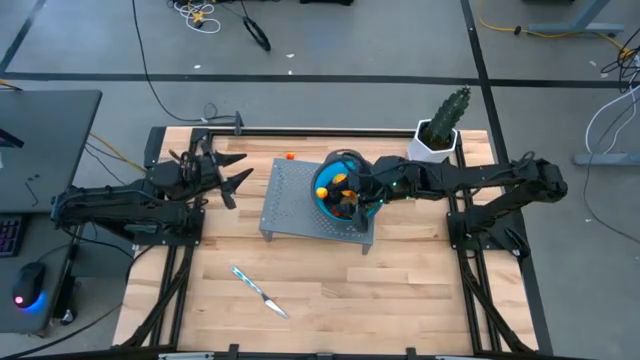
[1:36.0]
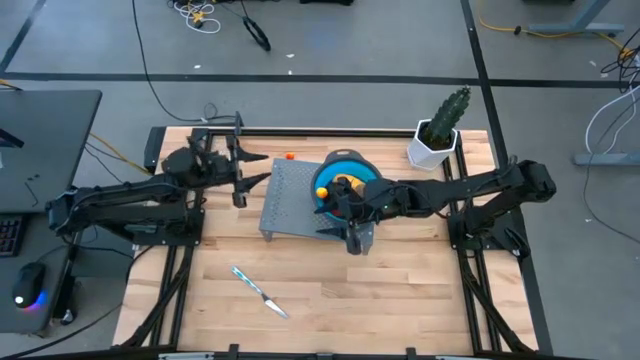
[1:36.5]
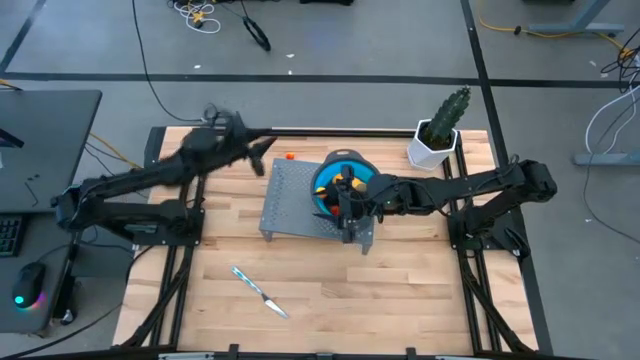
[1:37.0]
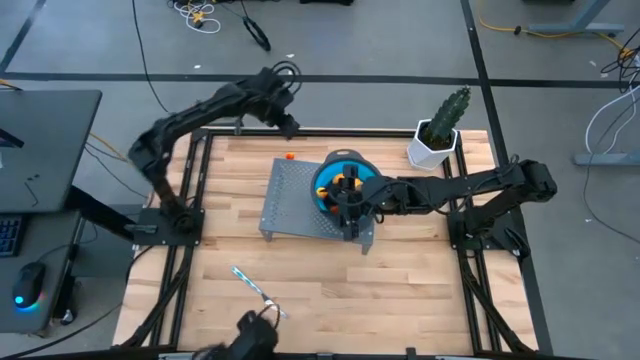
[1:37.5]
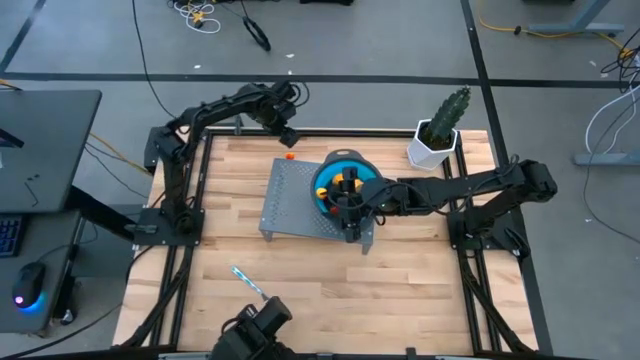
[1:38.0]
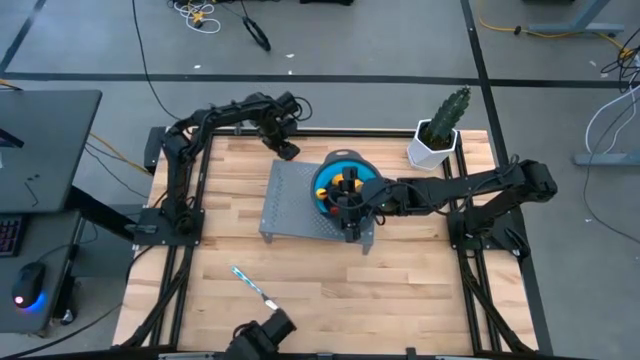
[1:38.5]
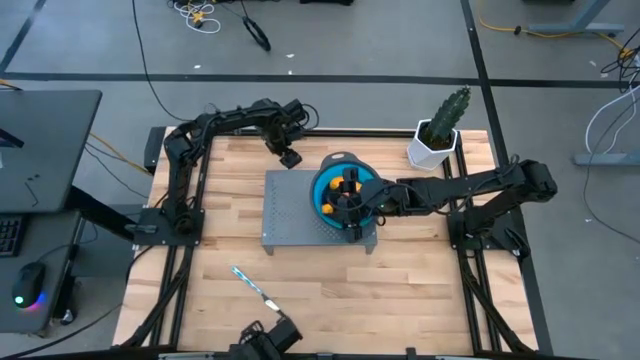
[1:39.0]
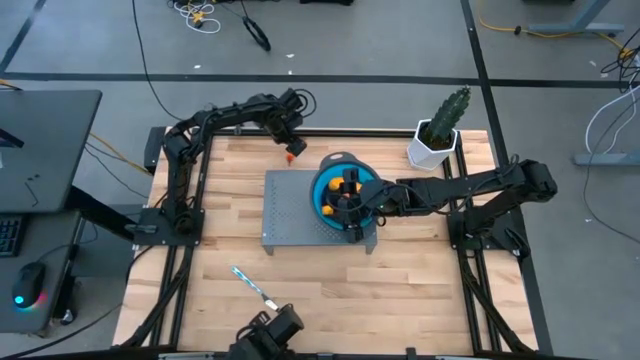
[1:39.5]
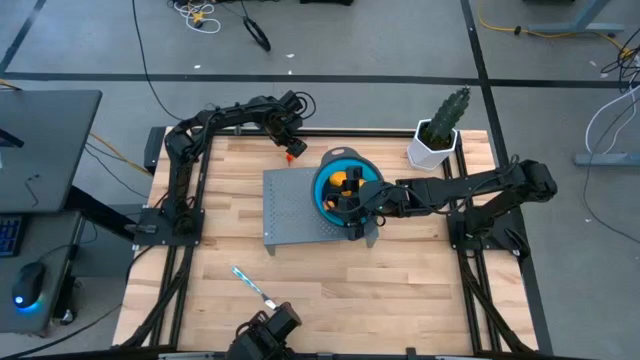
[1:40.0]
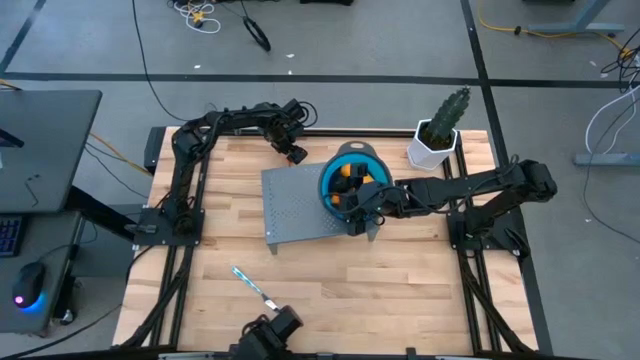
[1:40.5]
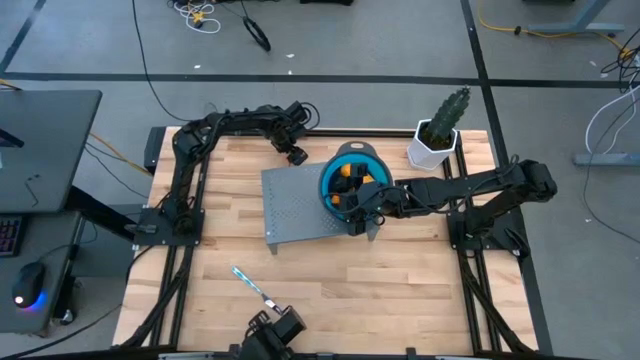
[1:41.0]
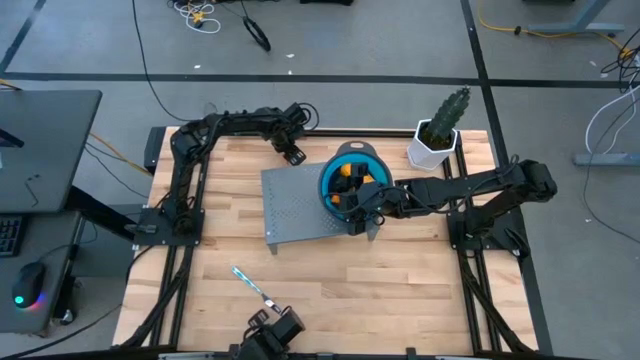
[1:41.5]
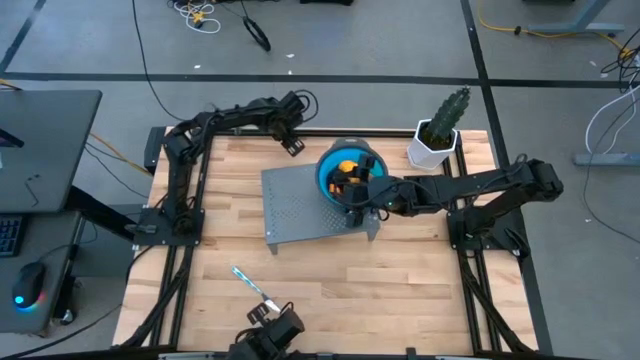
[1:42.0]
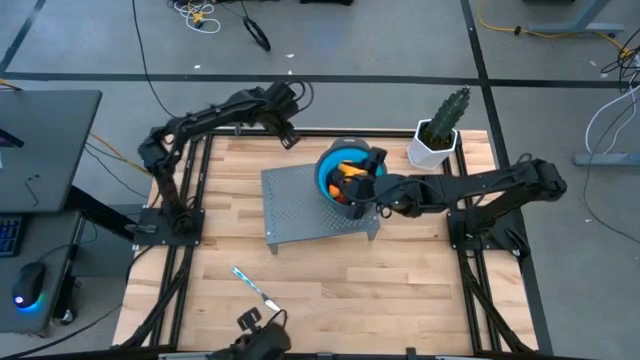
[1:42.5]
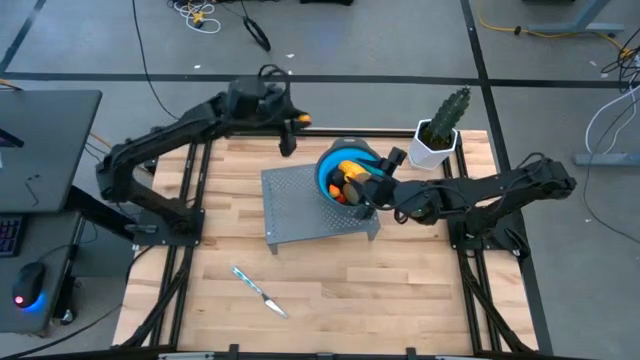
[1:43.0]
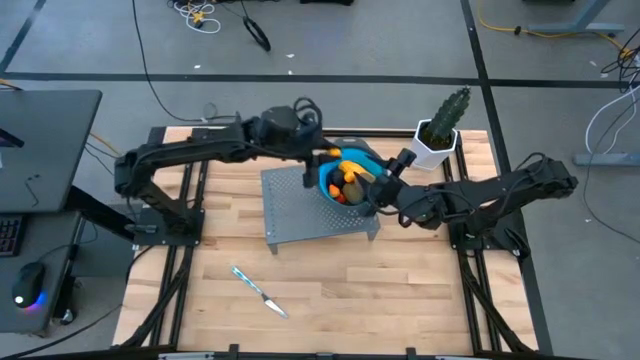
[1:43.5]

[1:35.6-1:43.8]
Task: Pick & Place Fruit
Put the orange pear into the blue strainer bowl on the shelf

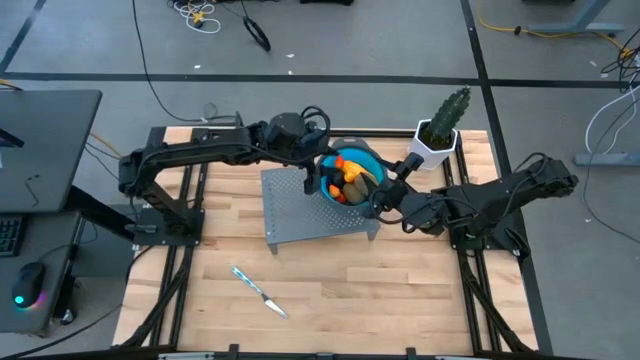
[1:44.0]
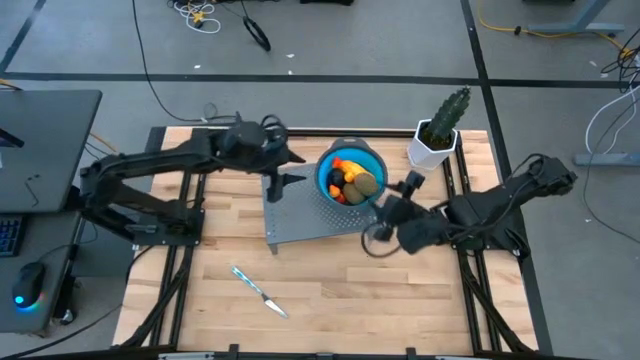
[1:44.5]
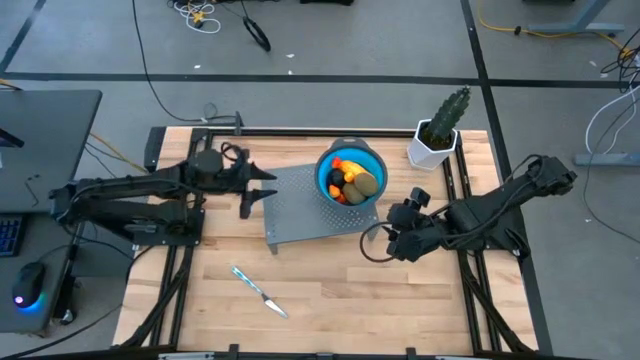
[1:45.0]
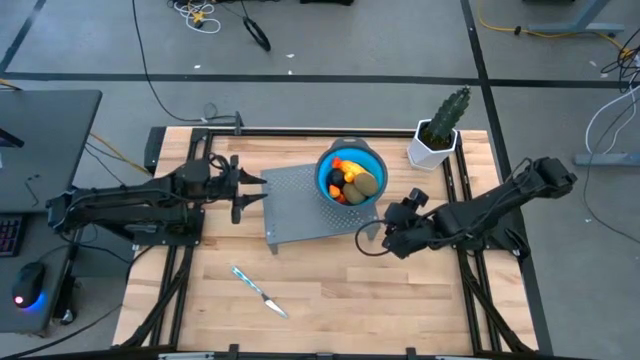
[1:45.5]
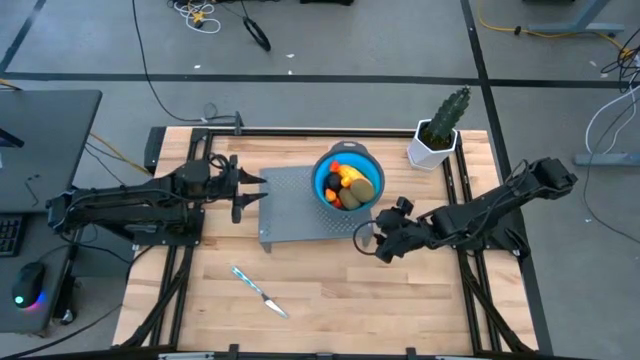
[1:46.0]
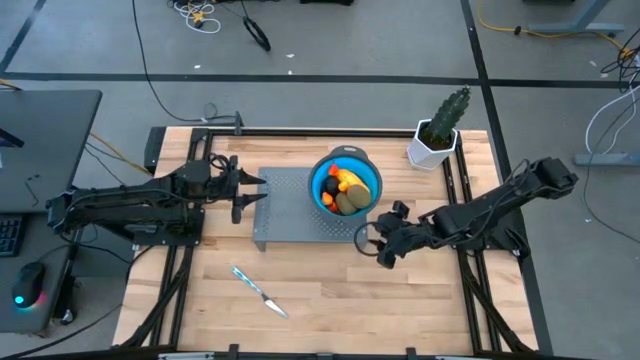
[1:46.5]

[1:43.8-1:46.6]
Adjust the shelf

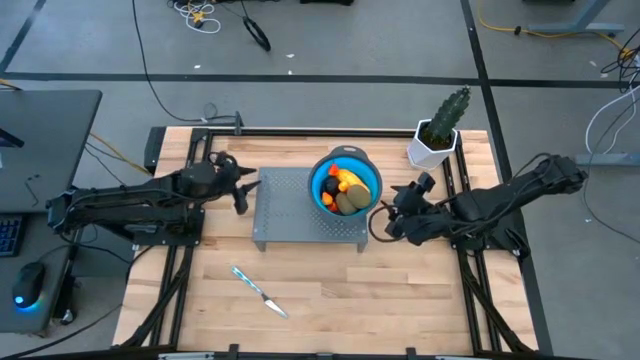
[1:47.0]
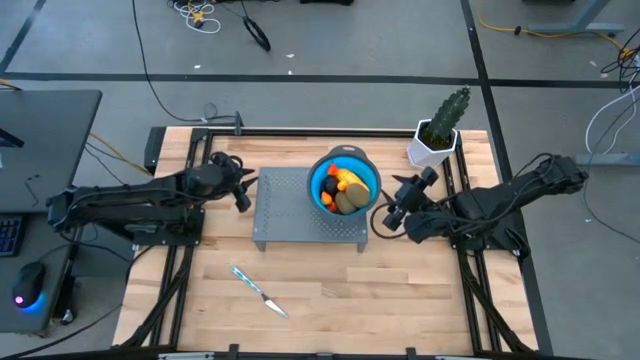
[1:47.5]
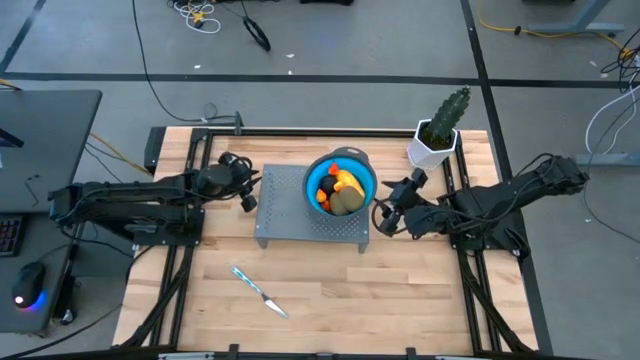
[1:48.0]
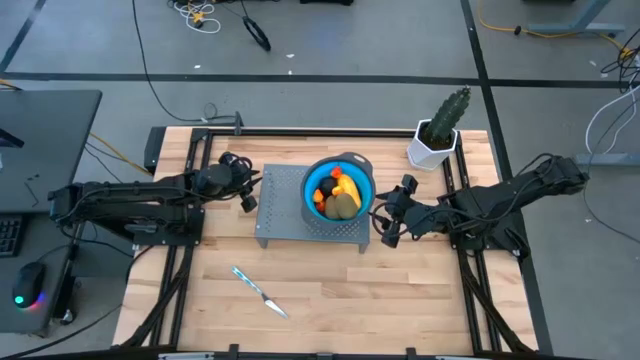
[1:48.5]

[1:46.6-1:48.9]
Adjust the blue strainer bowl on the shelf

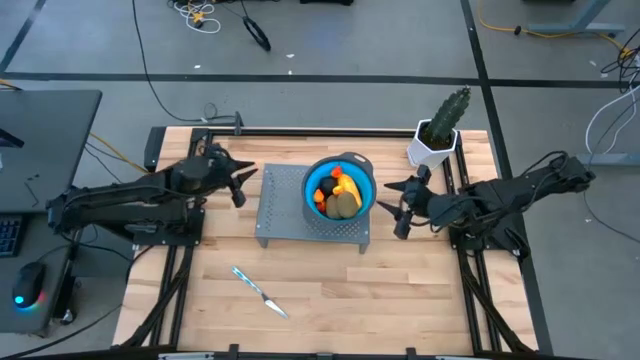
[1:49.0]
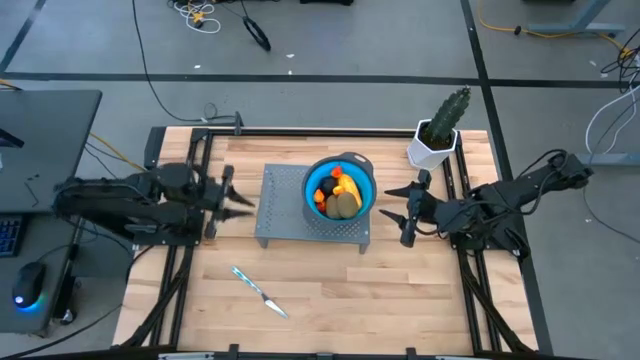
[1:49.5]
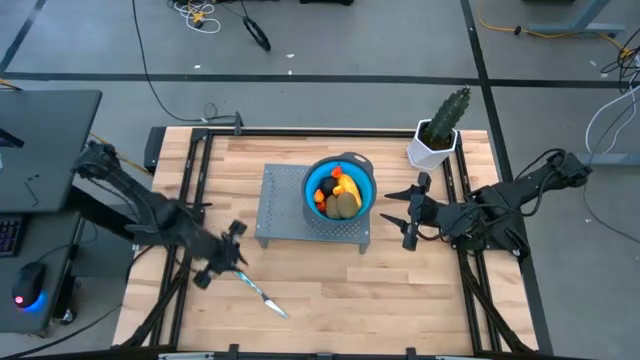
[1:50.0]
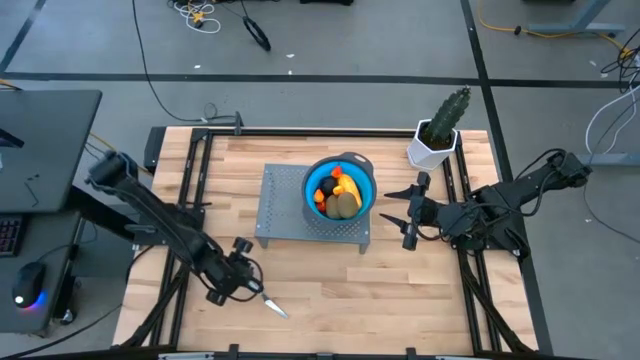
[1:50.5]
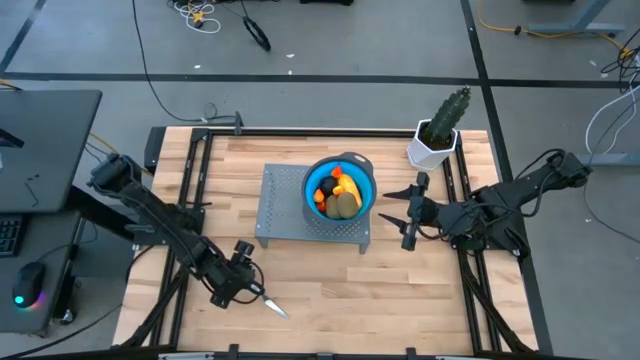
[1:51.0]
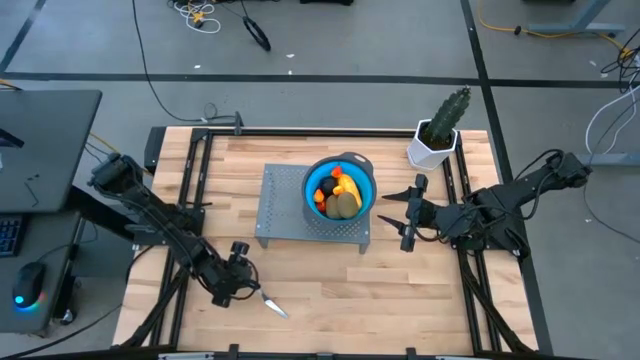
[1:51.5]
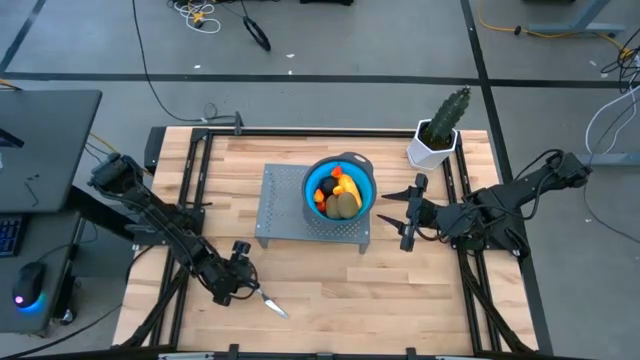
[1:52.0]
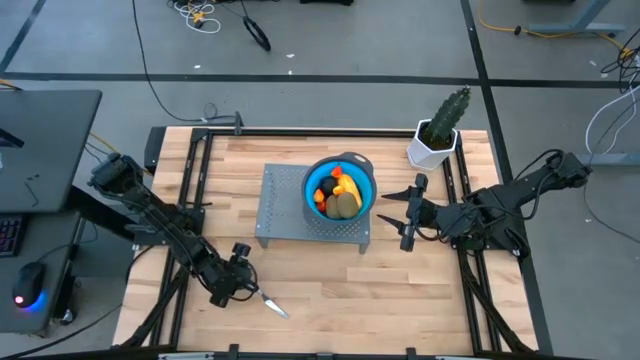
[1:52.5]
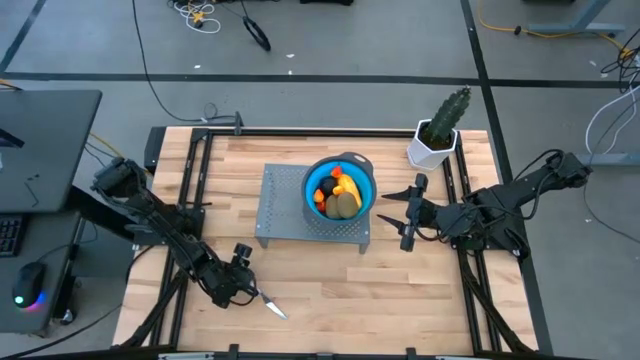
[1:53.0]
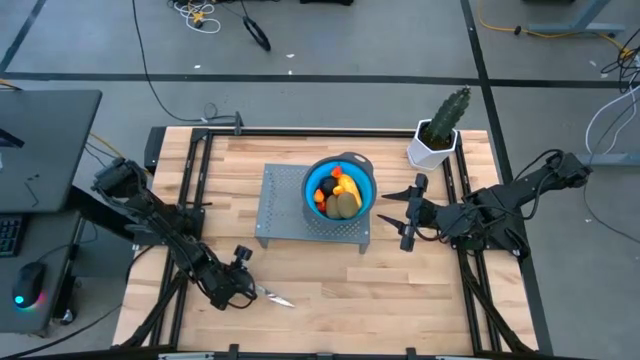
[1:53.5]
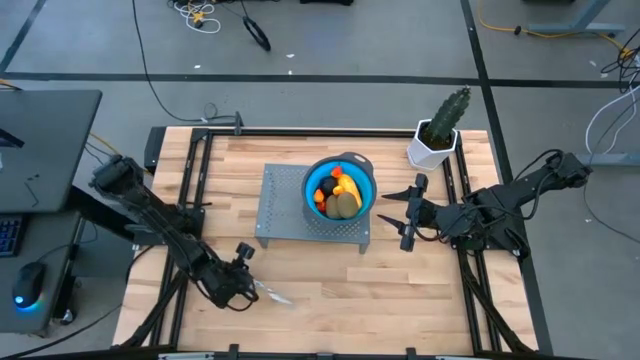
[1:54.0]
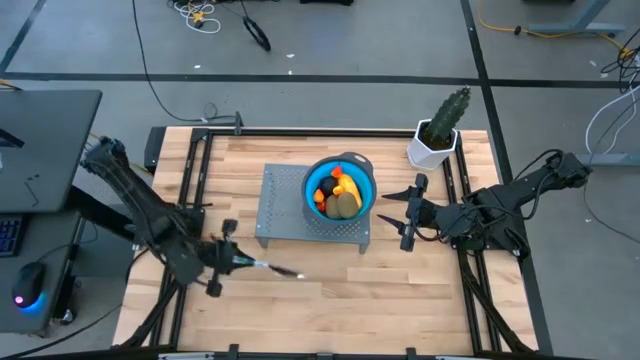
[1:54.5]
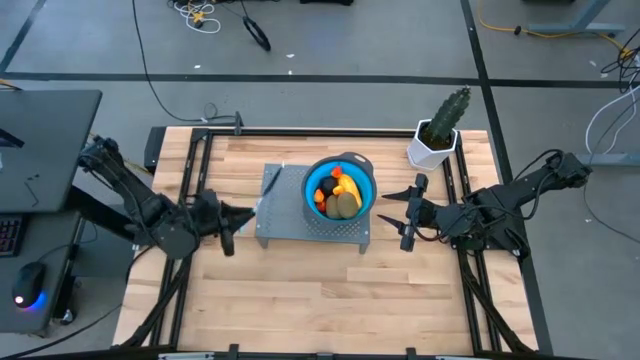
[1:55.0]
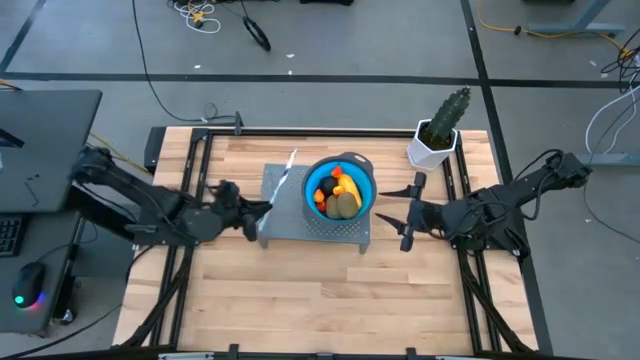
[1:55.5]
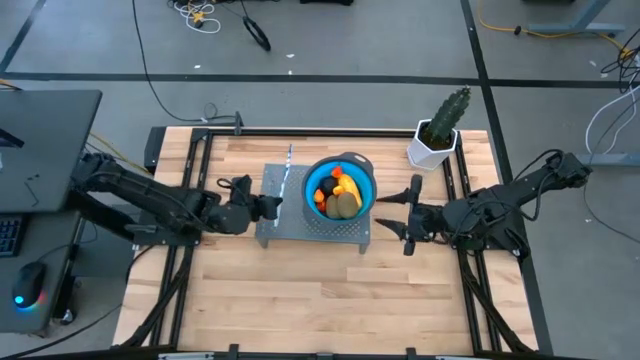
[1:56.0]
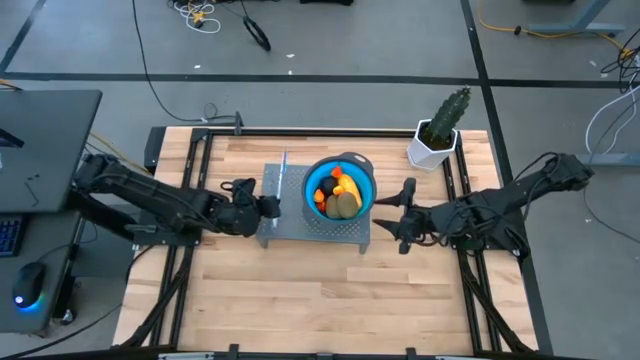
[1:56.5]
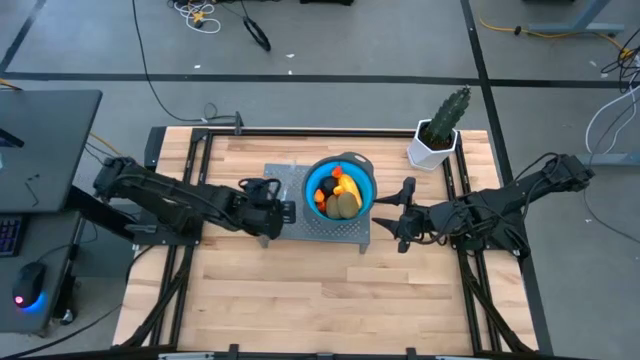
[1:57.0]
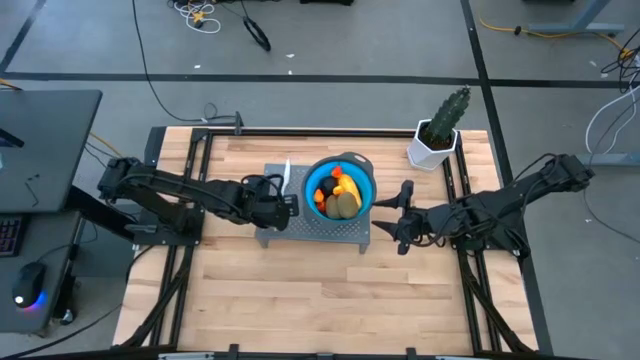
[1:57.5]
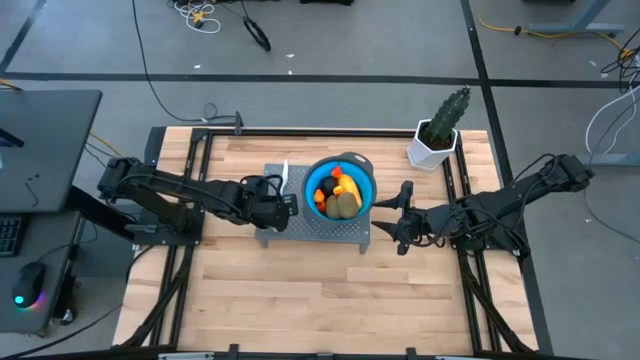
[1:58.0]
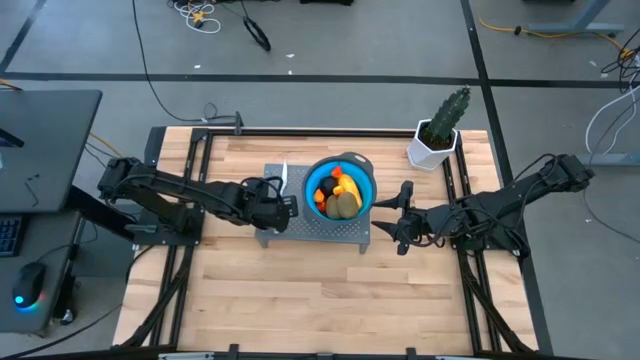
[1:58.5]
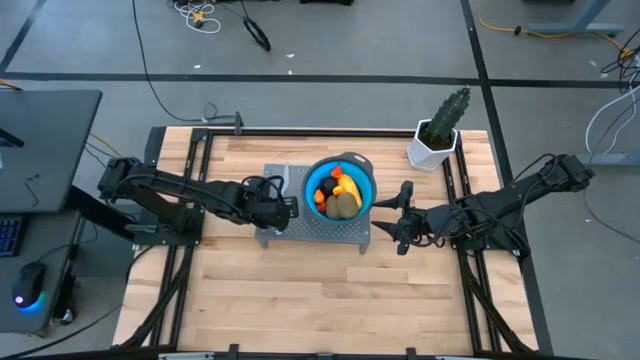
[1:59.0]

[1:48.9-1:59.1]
Put the blue knife on the shelf
